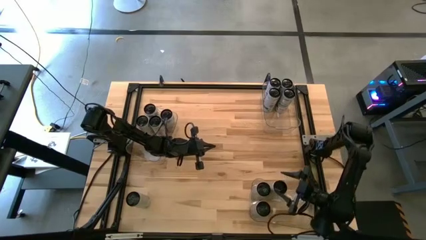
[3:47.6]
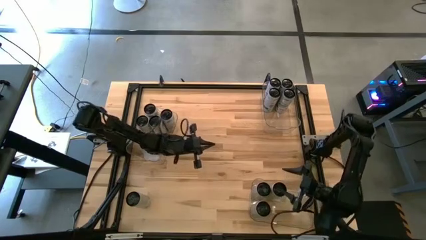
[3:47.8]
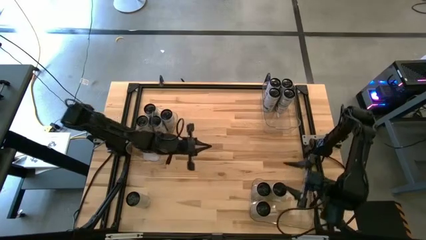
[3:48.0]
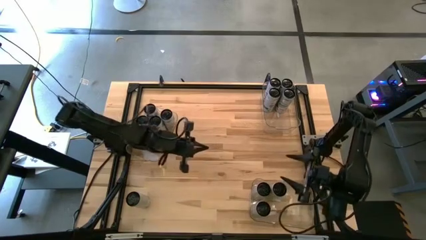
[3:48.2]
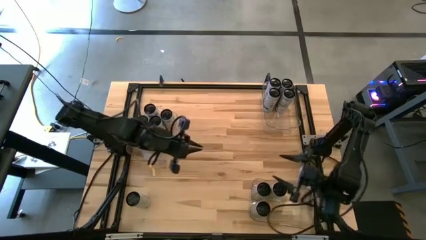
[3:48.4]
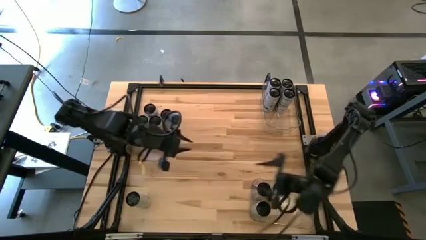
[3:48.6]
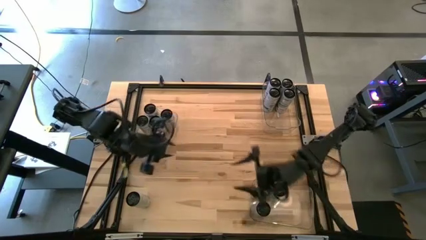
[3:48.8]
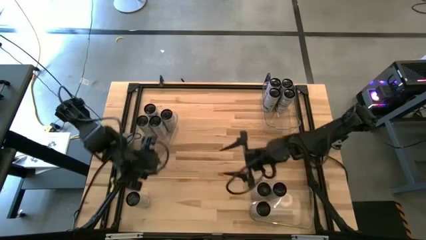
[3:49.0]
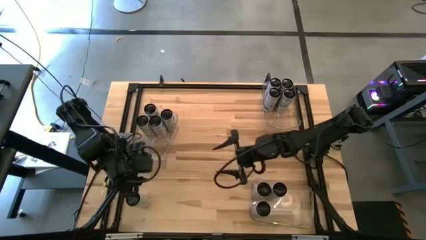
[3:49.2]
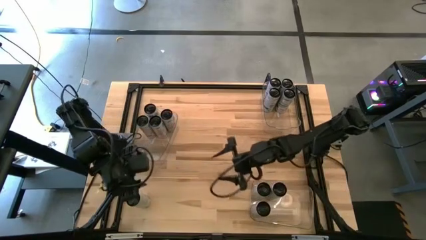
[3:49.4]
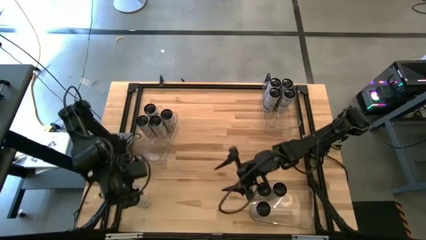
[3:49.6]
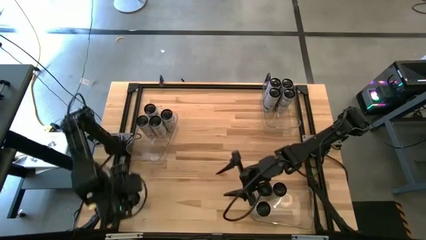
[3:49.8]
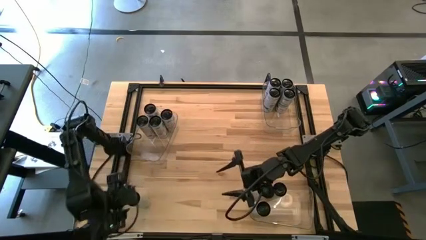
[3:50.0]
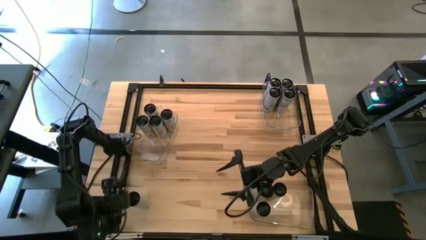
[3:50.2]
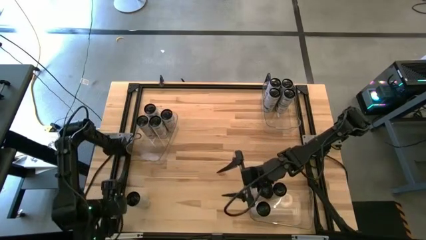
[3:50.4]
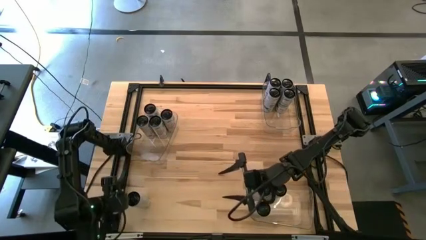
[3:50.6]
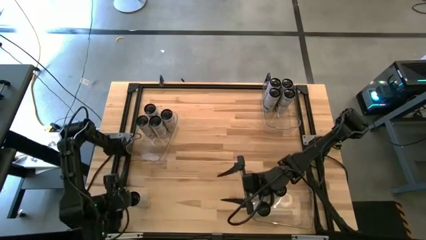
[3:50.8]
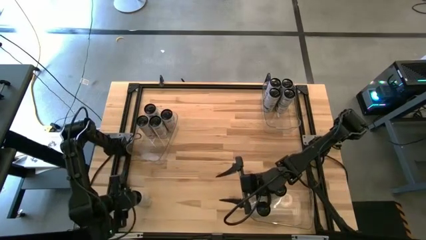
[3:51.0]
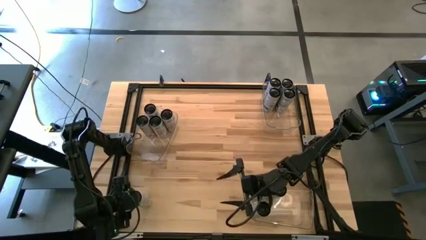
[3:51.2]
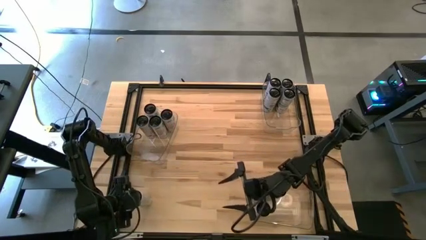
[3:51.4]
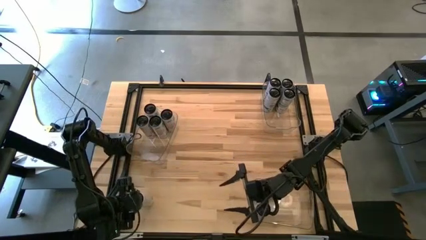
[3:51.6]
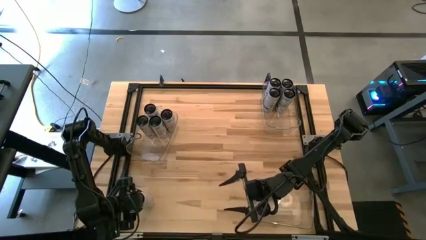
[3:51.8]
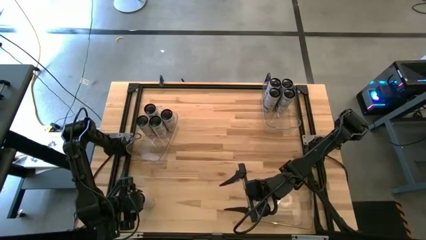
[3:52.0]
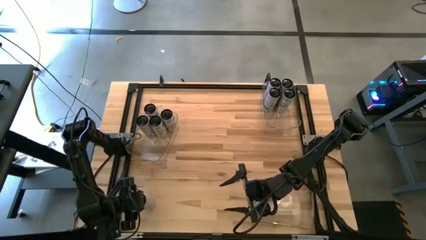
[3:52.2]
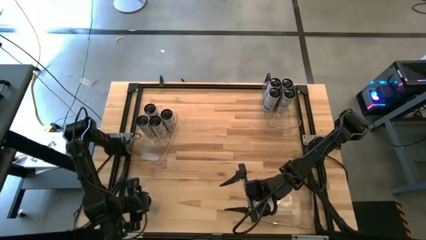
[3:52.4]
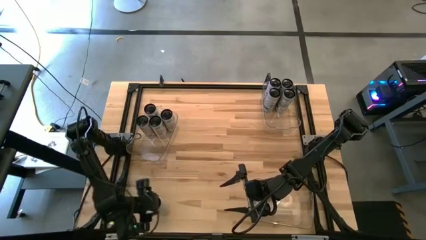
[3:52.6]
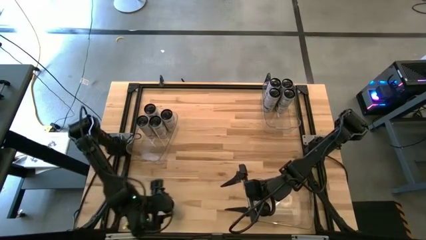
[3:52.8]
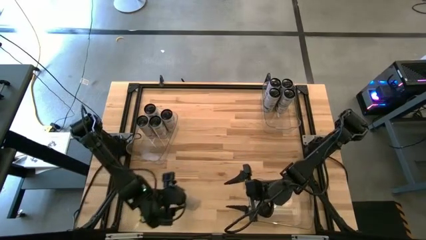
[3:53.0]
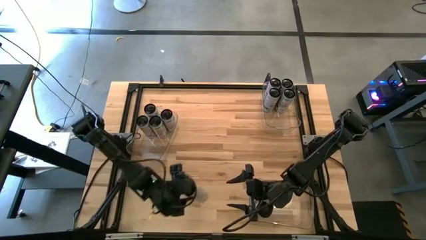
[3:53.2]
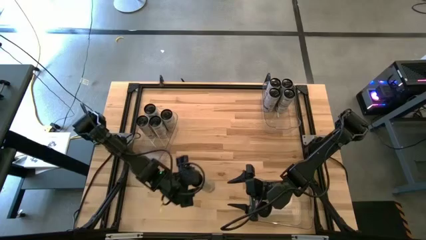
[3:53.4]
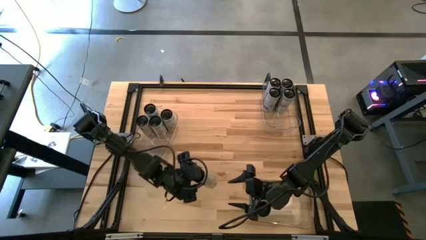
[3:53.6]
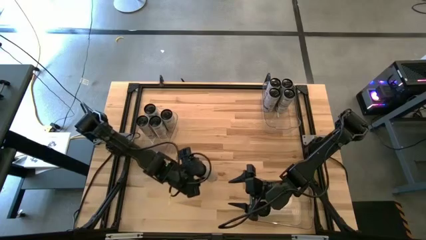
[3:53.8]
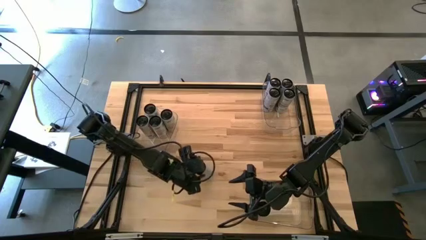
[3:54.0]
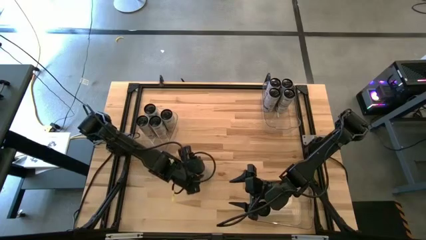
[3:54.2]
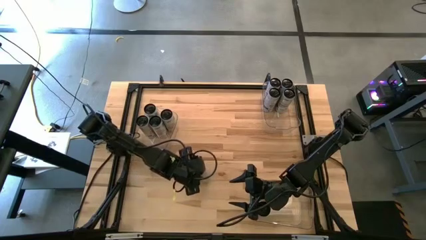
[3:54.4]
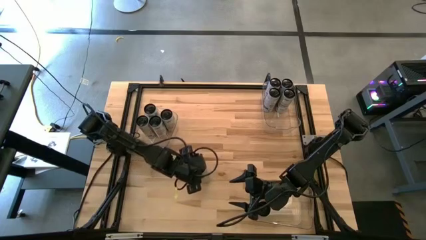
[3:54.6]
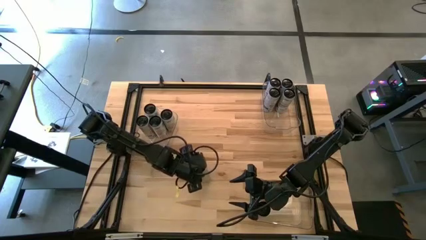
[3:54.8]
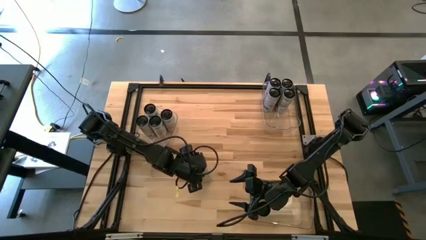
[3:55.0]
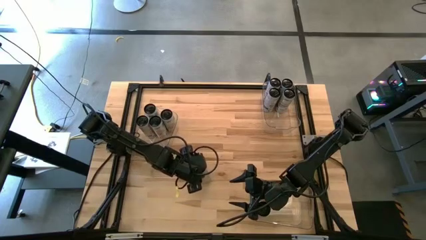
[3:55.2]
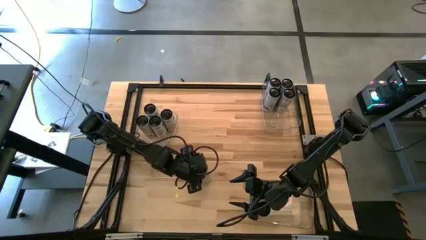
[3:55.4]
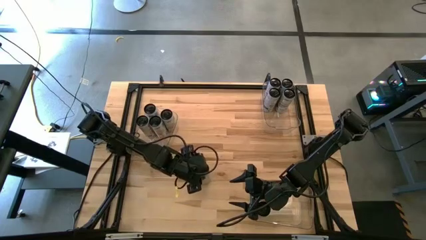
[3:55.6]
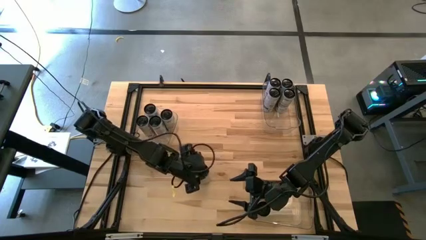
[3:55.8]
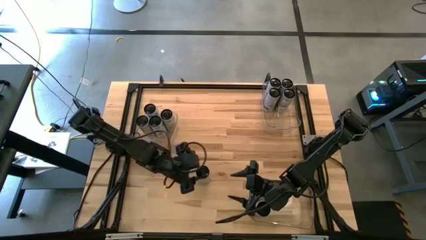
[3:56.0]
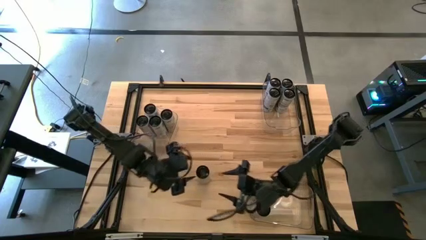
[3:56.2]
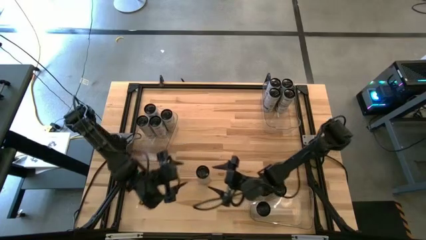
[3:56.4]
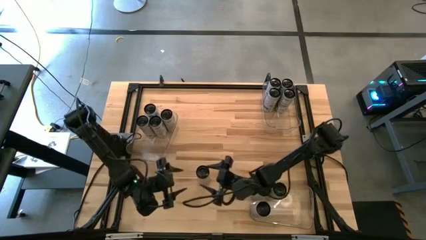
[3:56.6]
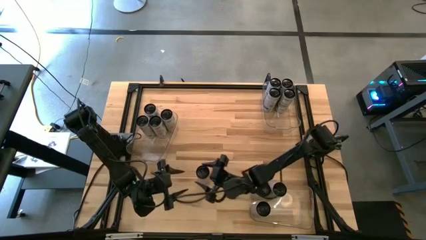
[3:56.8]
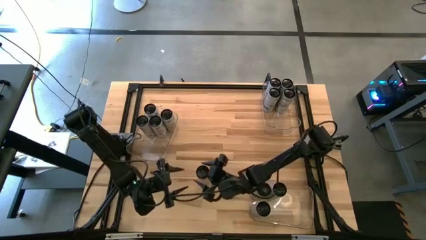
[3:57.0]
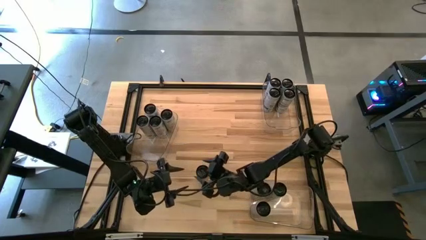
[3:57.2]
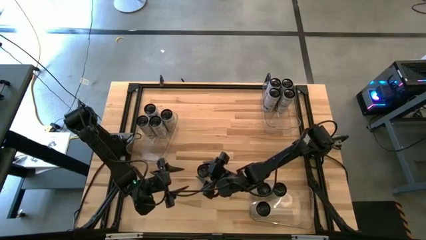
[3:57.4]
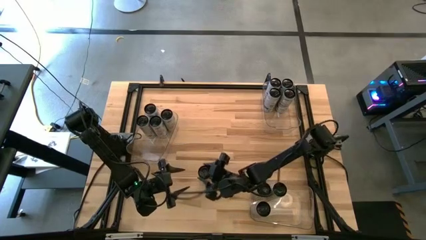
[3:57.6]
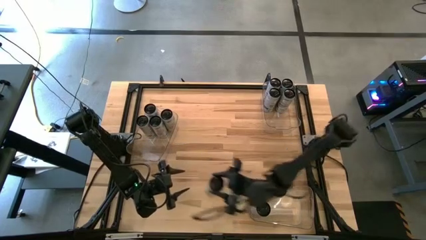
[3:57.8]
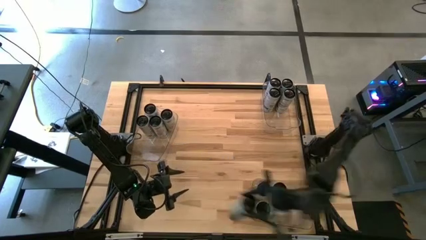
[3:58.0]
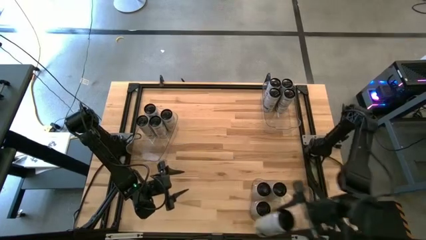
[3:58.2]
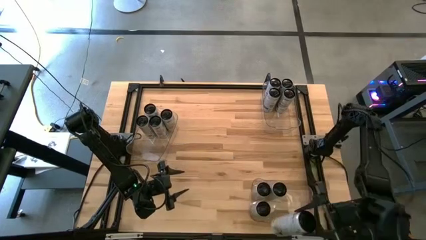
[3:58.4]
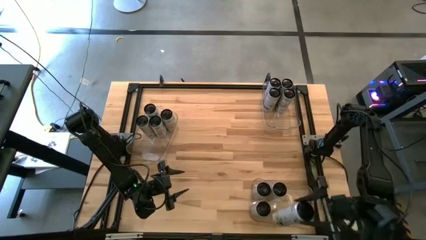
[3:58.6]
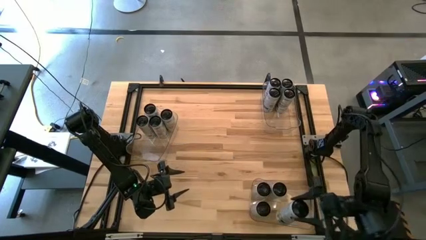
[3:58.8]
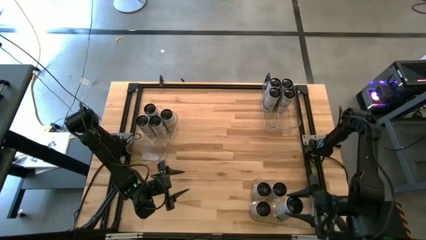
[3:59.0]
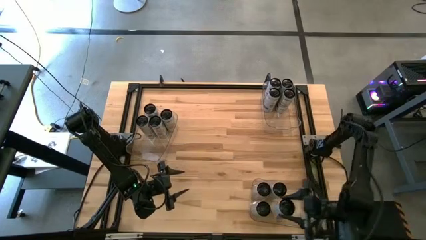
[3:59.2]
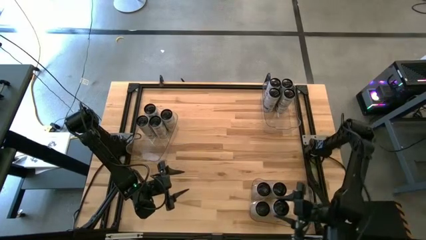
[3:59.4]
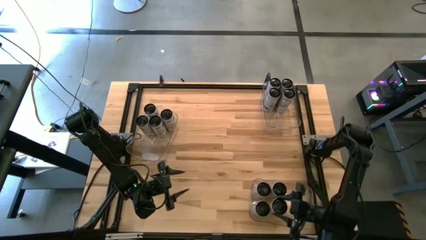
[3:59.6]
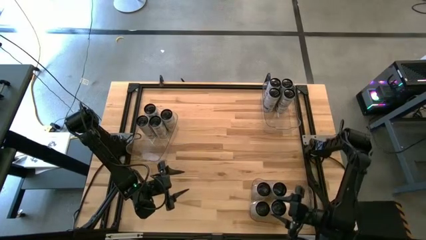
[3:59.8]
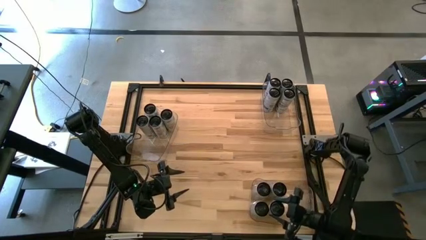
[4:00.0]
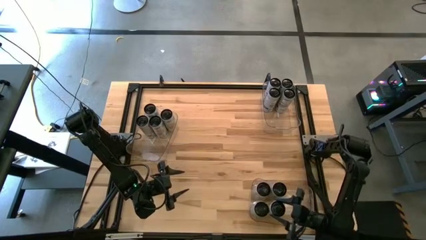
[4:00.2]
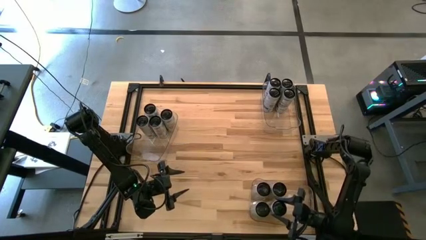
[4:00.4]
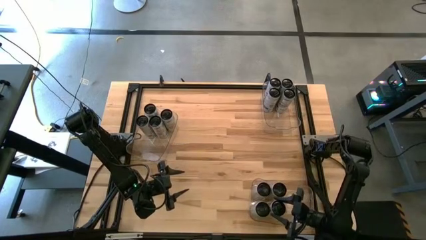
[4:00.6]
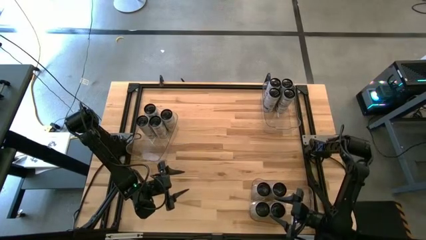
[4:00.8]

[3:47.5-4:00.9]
Task: Sort soda cans
Put the white-yellow soda can into the bottom transparent bin

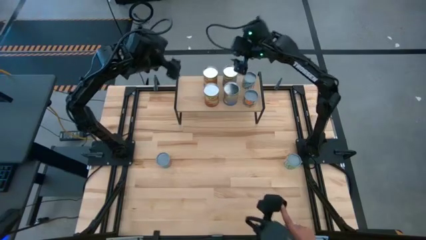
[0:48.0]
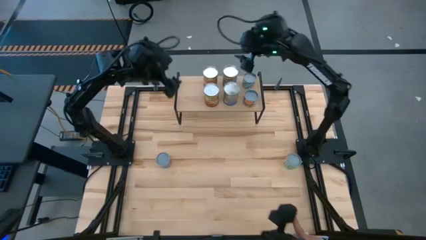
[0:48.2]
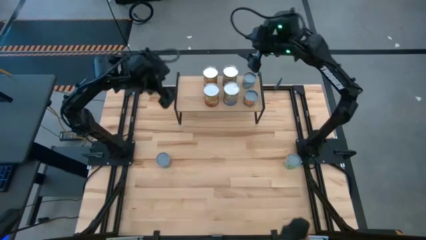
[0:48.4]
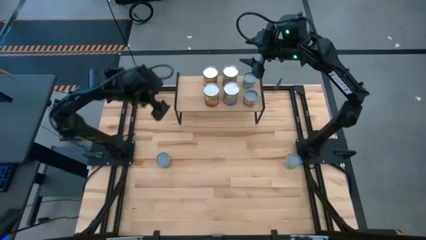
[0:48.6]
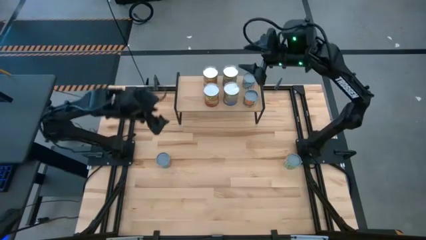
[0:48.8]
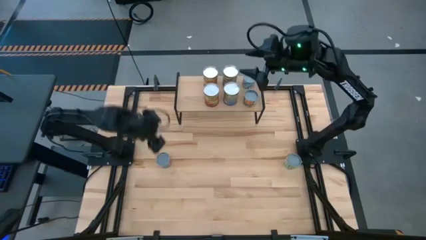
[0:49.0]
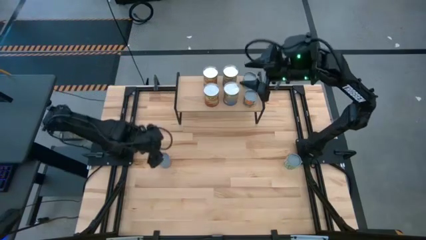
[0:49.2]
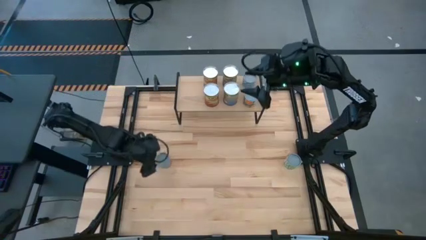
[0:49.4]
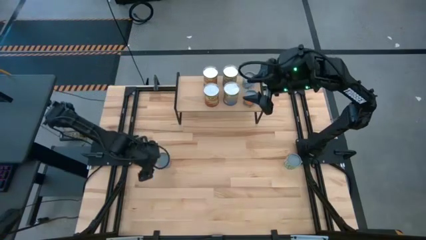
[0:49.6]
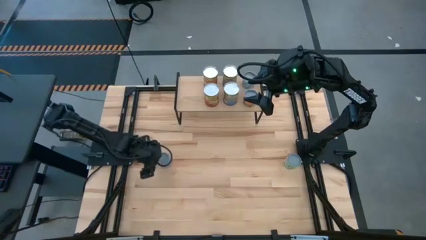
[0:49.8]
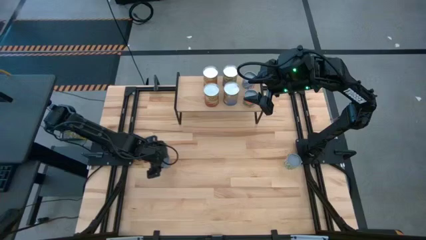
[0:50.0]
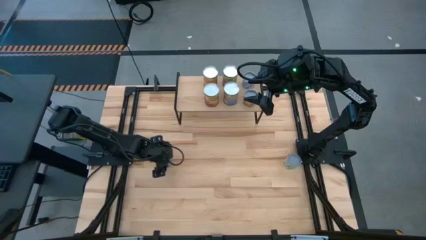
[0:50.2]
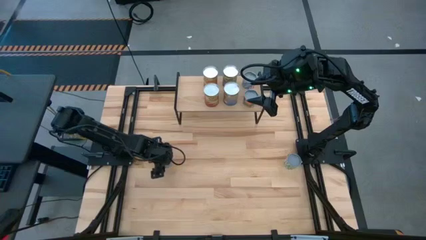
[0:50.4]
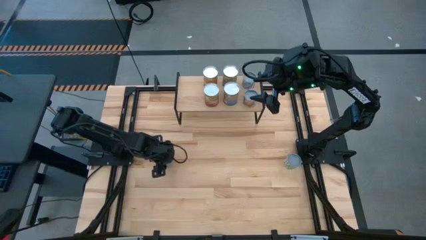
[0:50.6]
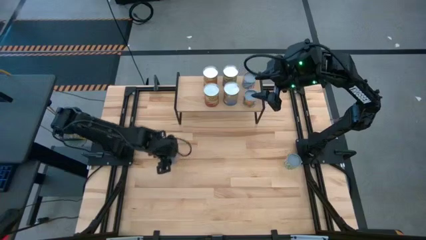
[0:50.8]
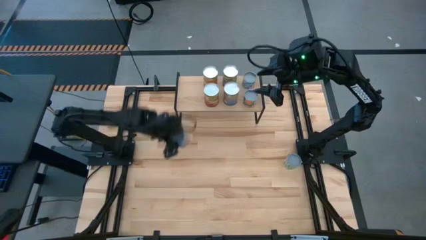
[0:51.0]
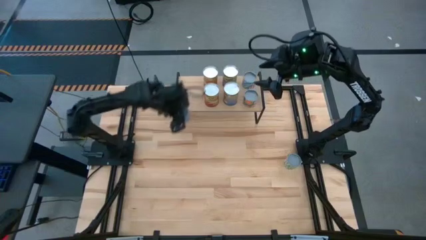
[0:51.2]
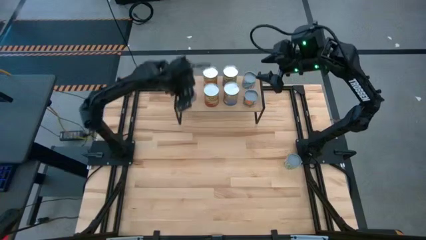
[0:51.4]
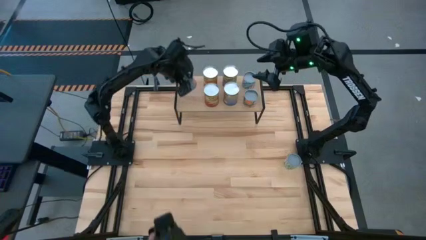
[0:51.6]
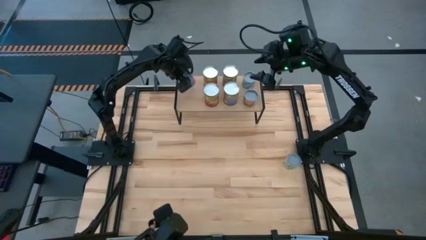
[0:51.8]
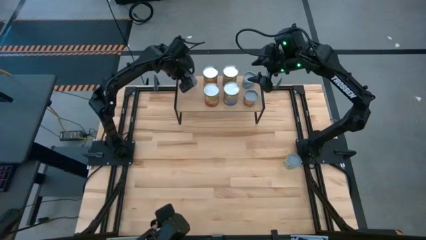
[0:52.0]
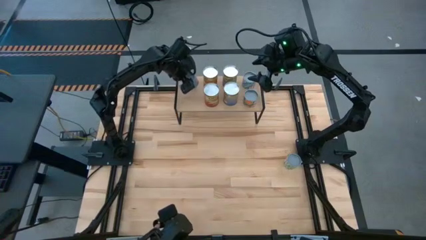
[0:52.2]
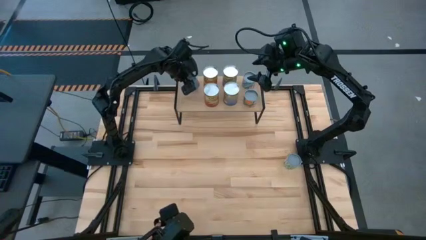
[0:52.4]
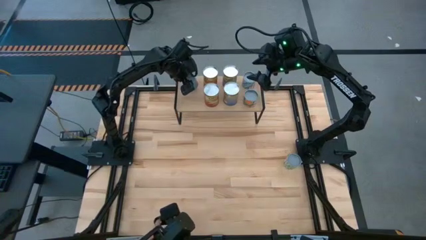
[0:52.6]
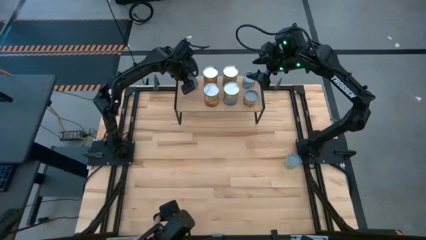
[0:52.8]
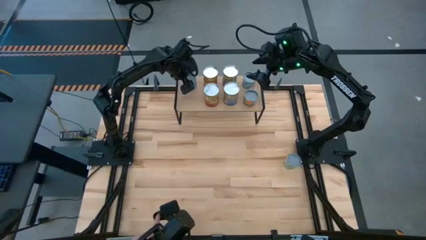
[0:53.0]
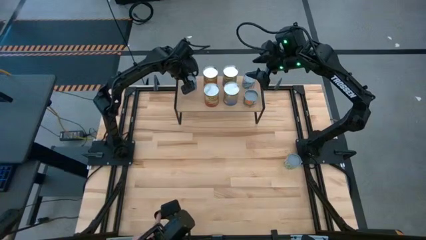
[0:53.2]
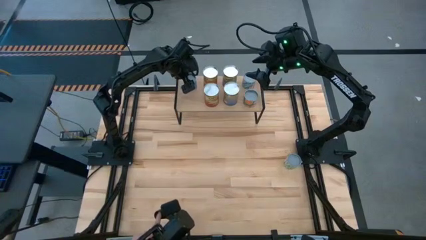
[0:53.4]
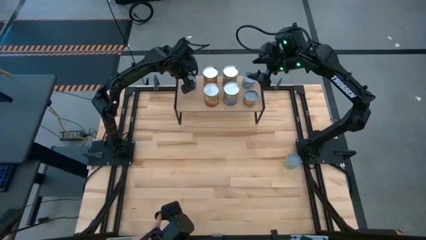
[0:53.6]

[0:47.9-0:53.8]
Task: Pick and place cans onto a shelf
Put the canned mixed fruits on the shelf
